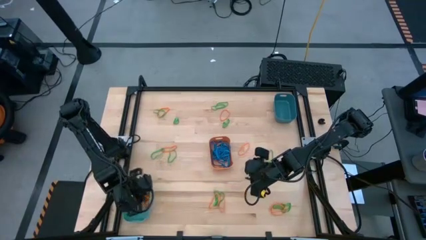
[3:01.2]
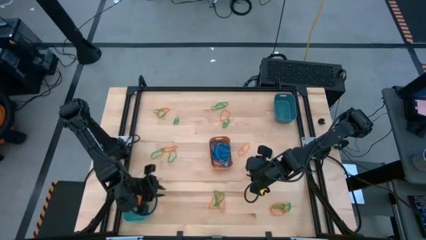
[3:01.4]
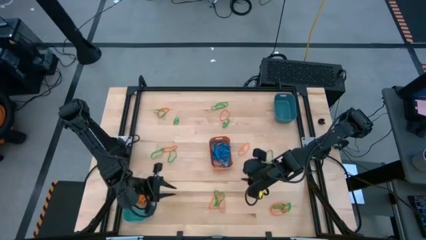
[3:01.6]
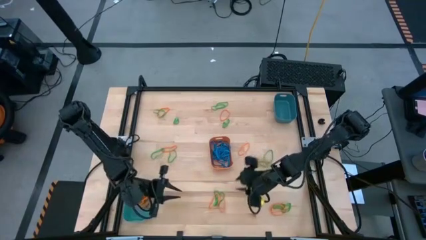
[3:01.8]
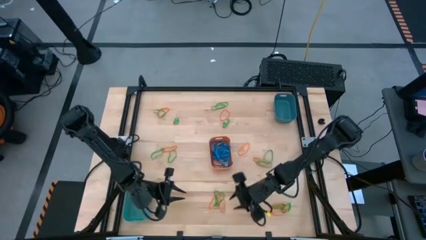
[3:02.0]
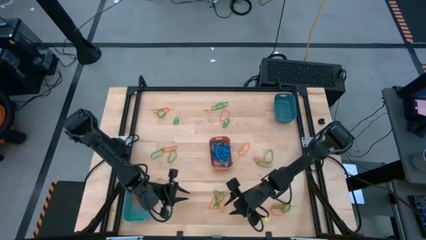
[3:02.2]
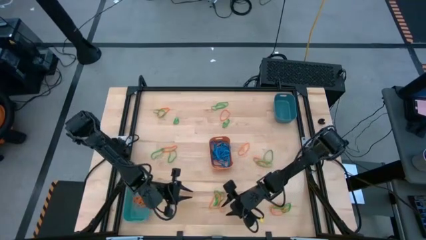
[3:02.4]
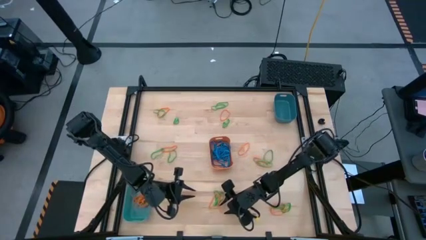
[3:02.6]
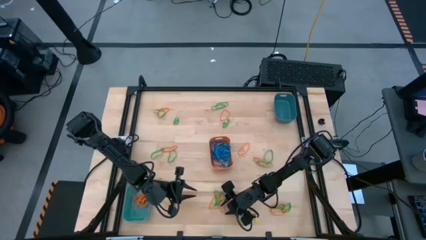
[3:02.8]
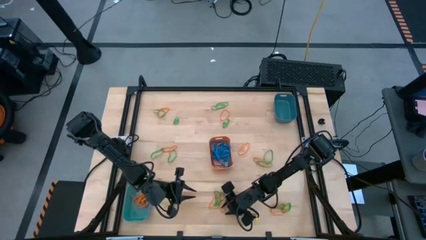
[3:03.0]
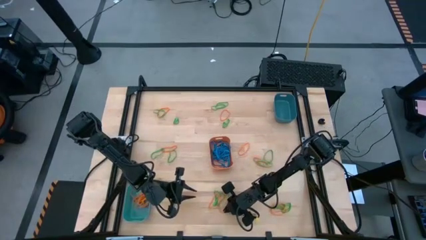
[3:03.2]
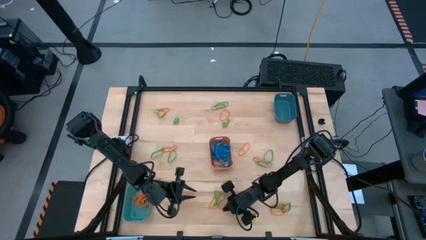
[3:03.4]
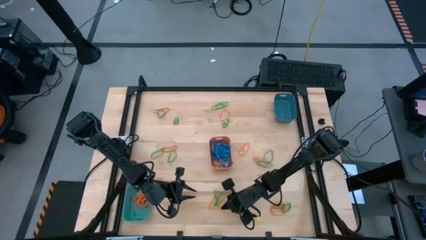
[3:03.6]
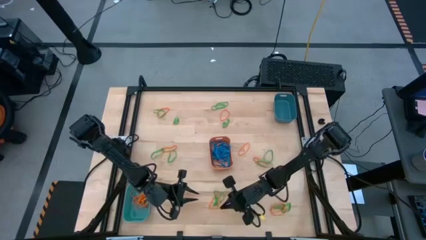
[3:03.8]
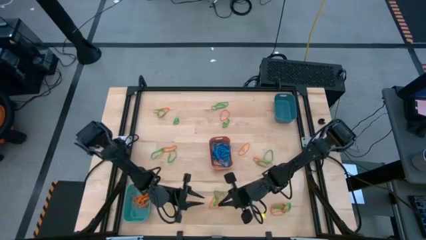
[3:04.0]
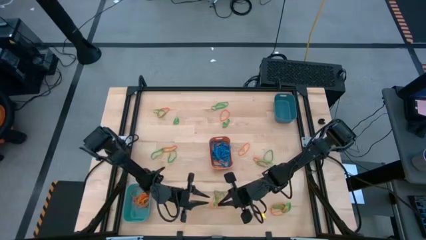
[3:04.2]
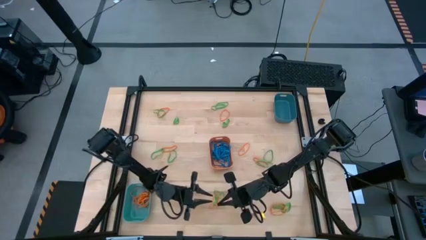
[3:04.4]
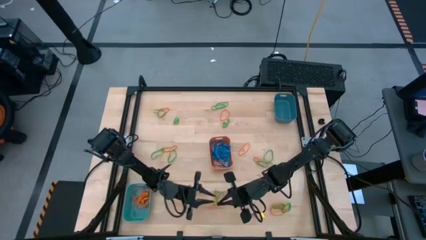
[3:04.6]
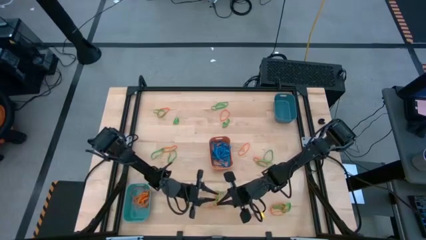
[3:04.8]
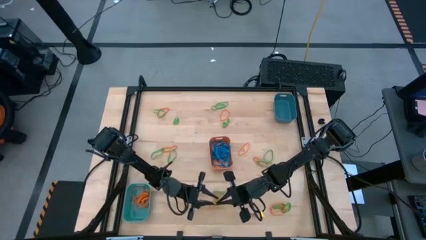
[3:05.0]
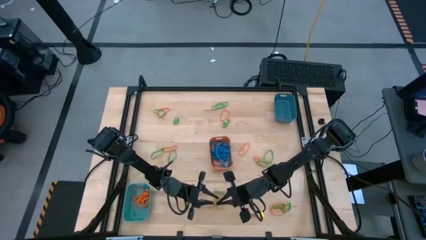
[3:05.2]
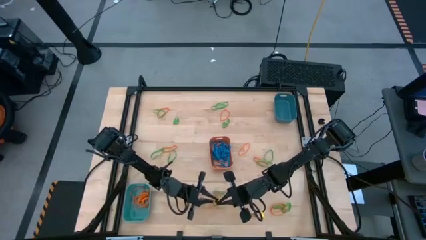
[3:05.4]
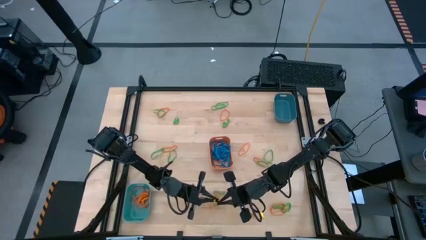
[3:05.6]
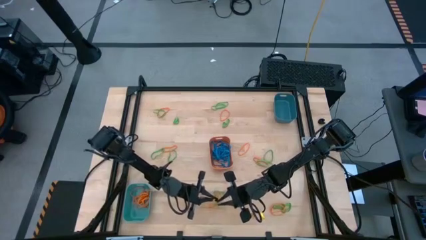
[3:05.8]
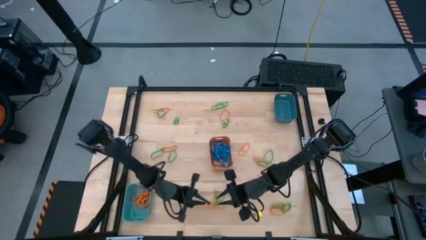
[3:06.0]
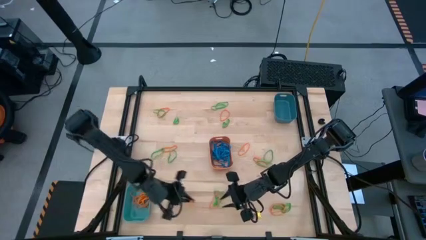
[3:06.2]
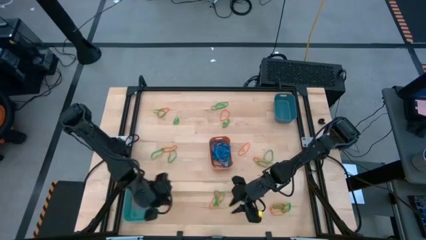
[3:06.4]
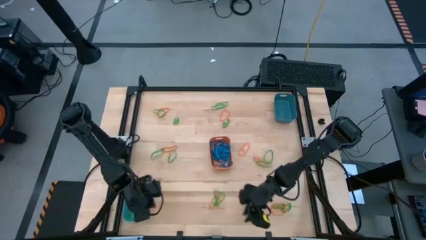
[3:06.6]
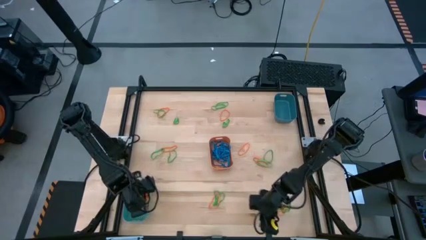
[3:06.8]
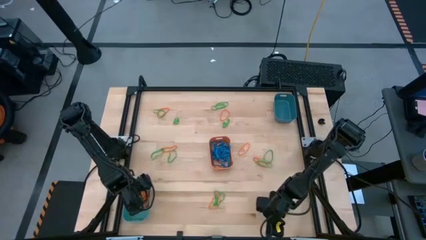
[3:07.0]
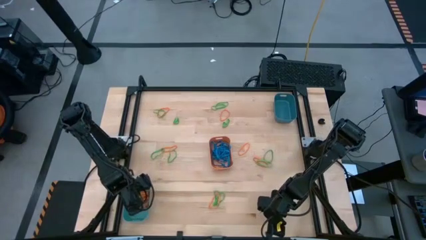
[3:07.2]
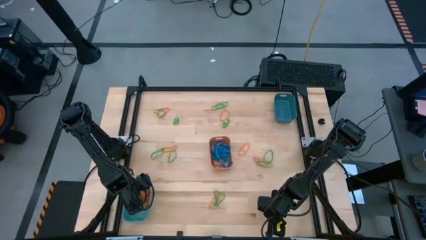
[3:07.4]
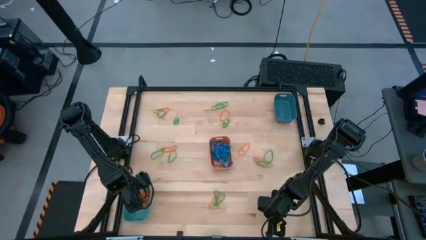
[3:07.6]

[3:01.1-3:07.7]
Task: Sort rubber bands into baskets
Put the orange rubber band into the green bin

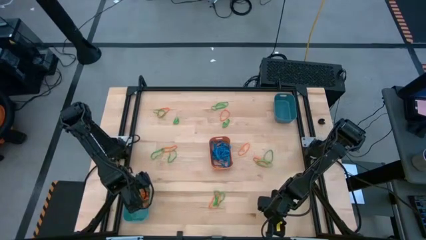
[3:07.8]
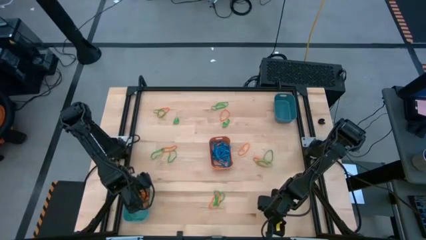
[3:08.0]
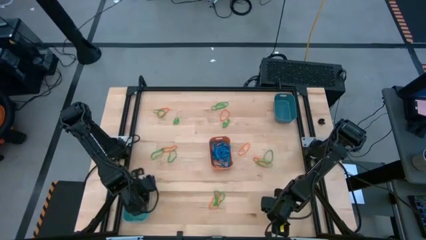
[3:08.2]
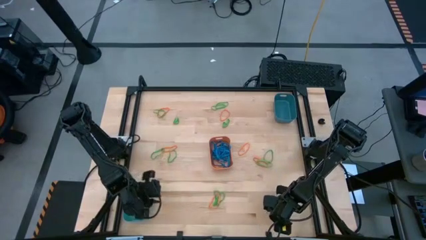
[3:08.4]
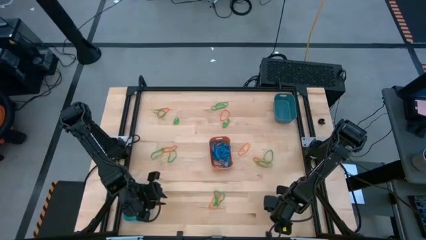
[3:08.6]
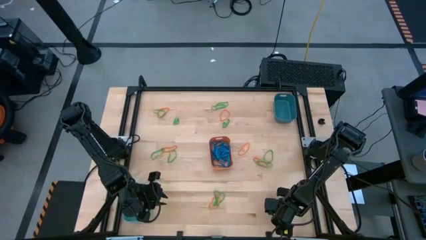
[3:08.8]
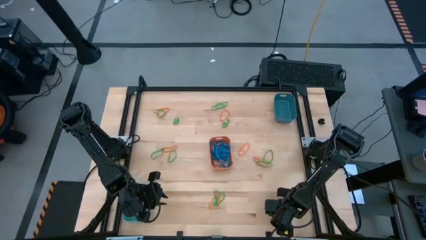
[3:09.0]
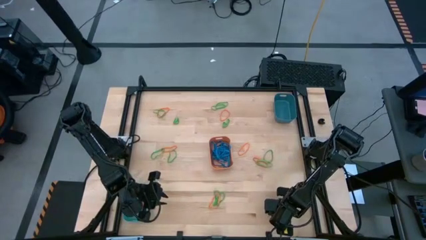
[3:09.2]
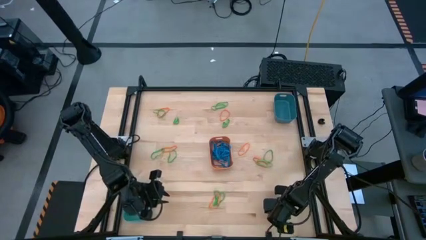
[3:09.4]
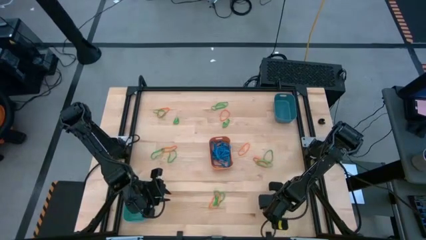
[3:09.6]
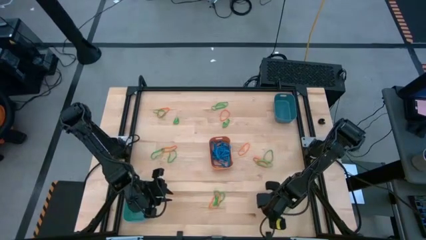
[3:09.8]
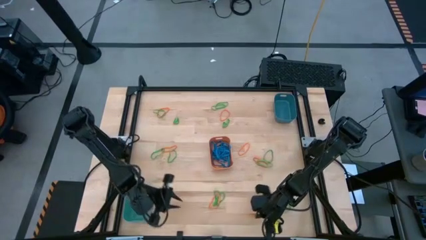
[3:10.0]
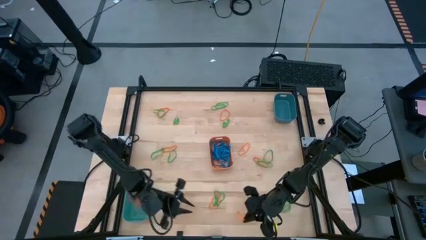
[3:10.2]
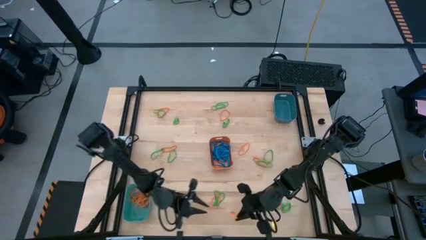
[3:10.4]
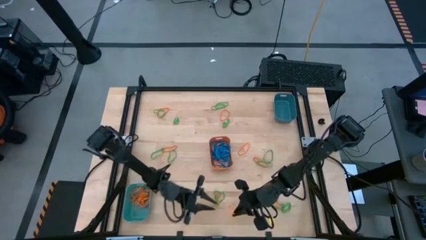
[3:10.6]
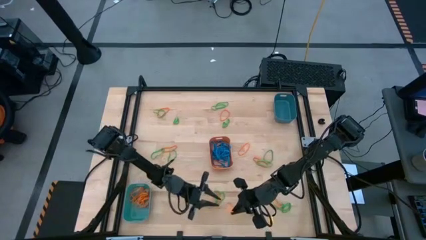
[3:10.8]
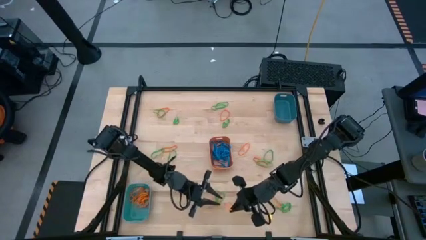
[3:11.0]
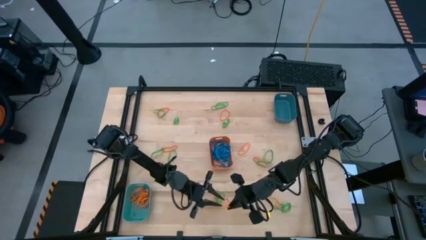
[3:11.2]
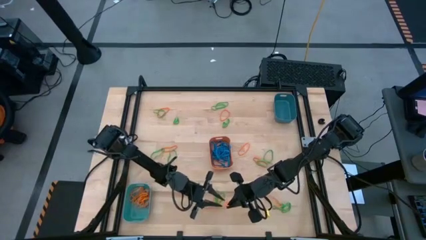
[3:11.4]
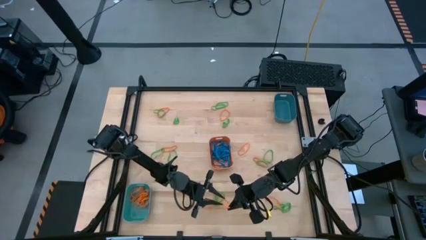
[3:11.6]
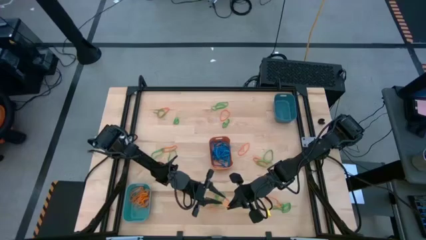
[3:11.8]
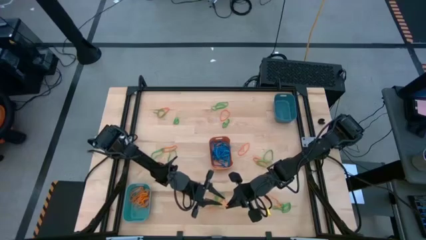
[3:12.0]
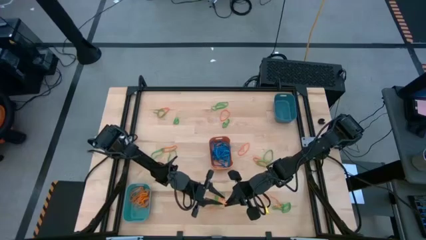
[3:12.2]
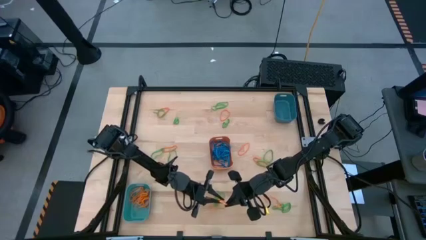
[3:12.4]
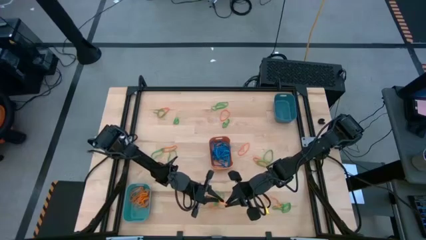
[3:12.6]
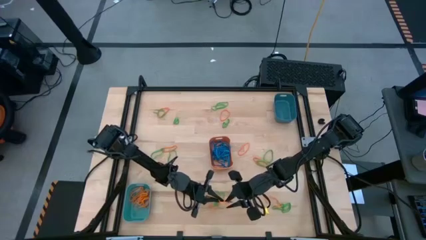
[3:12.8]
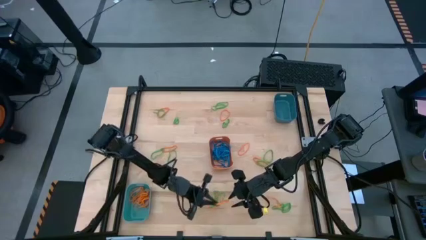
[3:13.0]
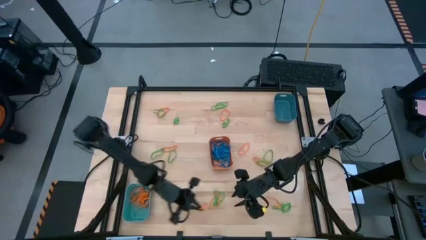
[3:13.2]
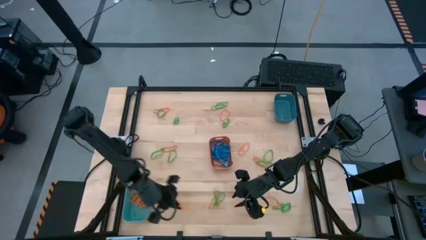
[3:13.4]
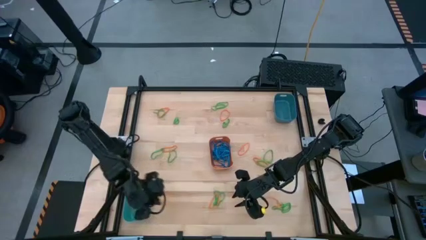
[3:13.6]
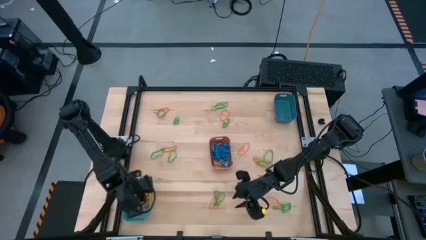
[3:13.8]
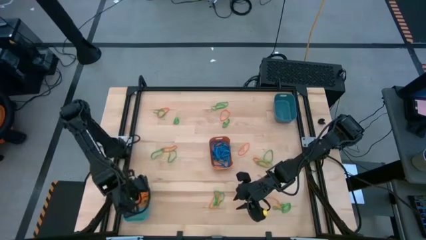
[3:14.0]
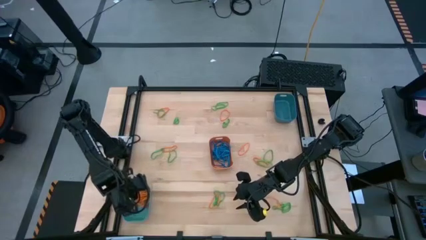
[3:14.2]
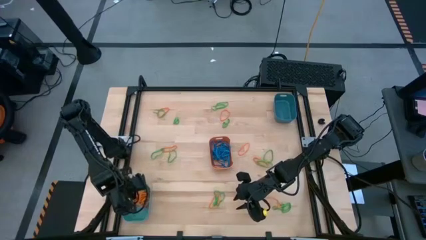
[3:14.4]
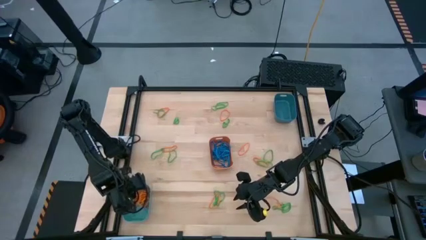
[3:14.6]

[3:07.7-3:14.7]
Put the orange rubber band into the green bin
